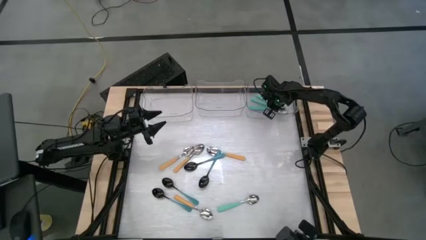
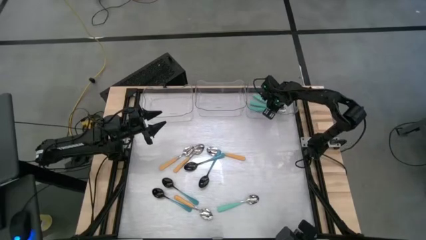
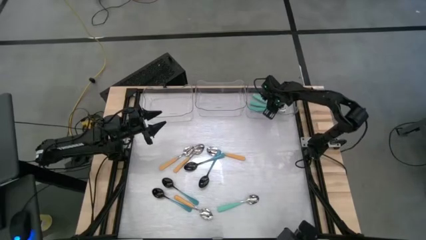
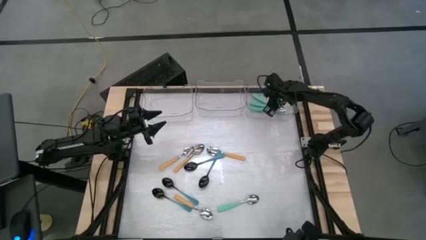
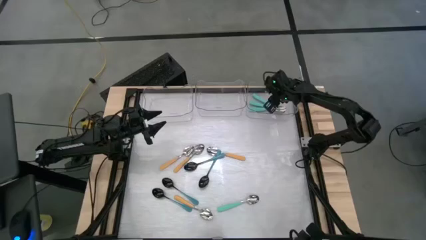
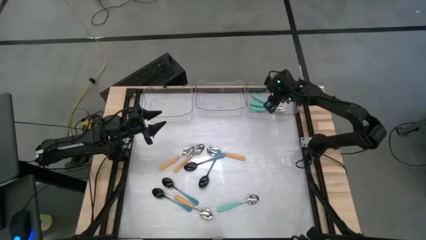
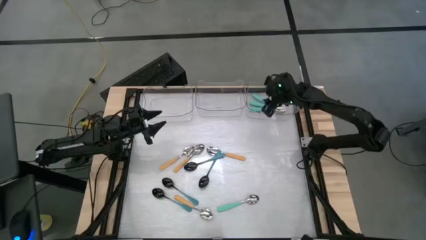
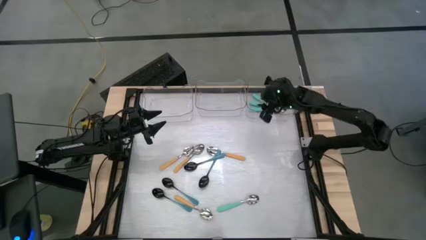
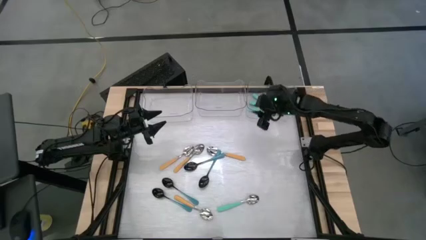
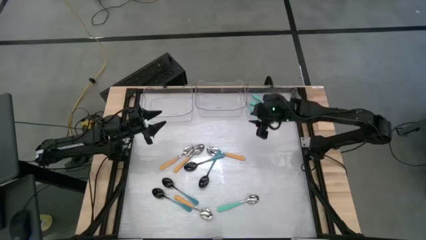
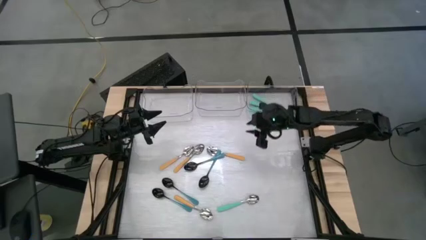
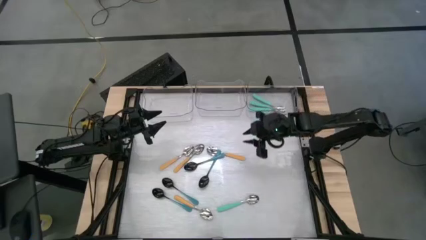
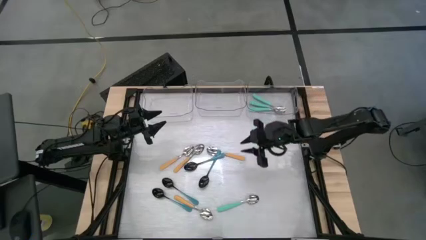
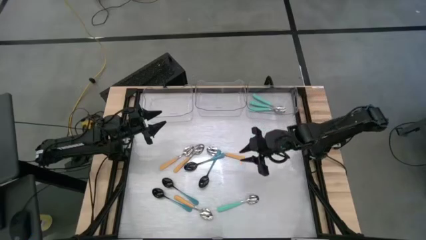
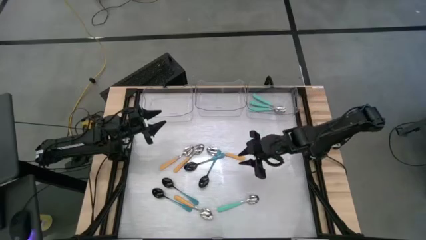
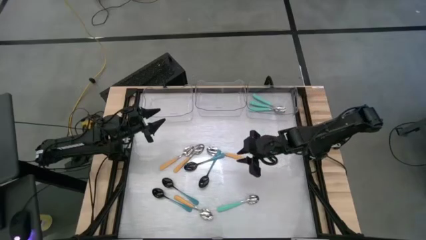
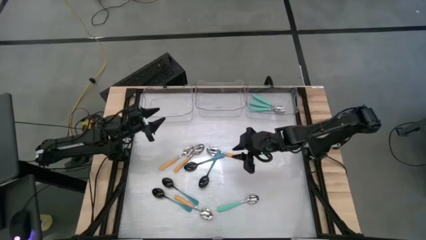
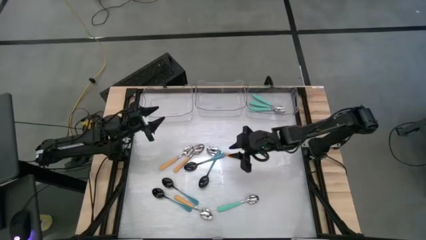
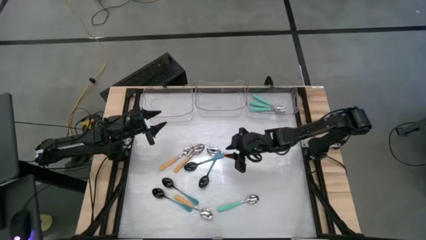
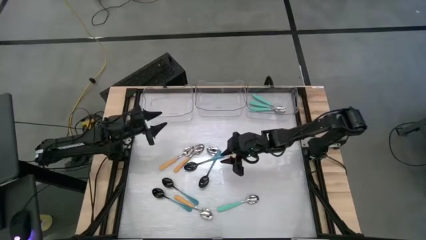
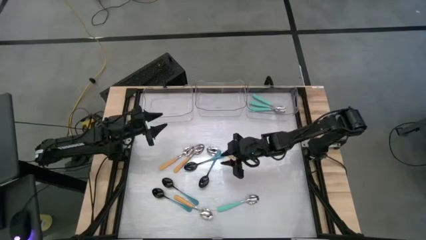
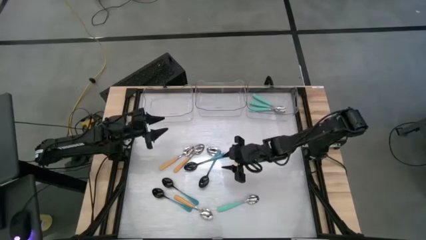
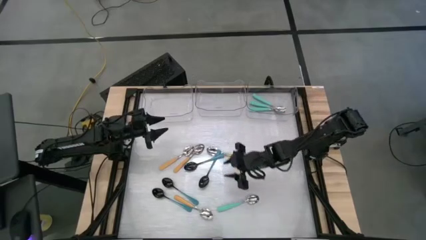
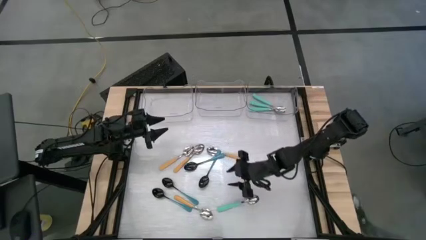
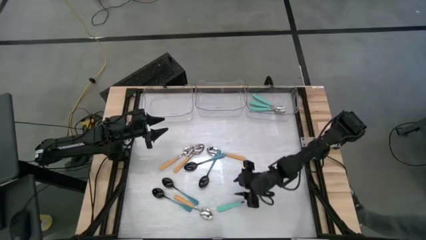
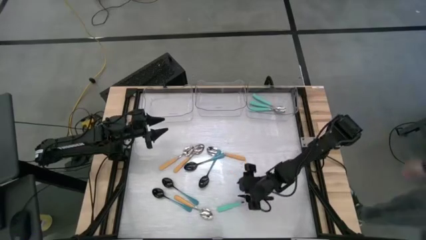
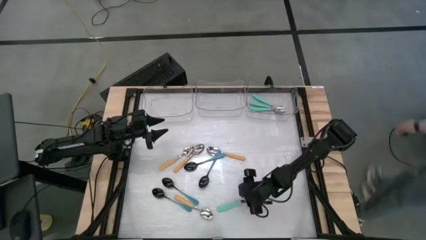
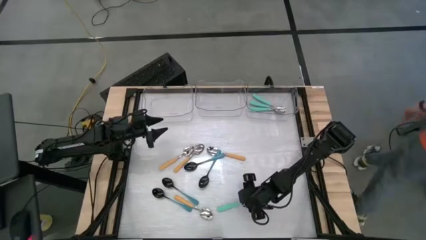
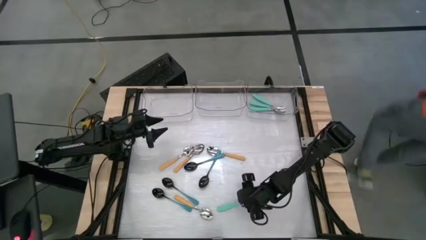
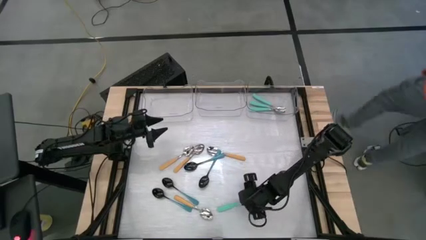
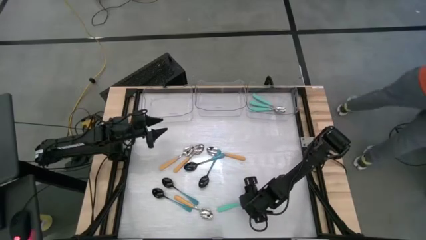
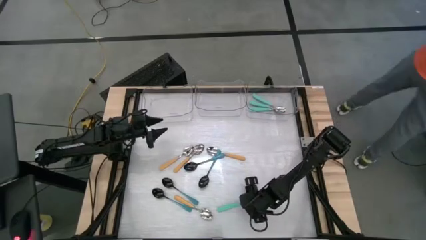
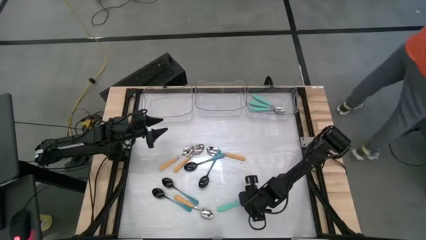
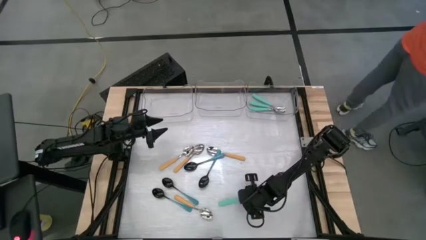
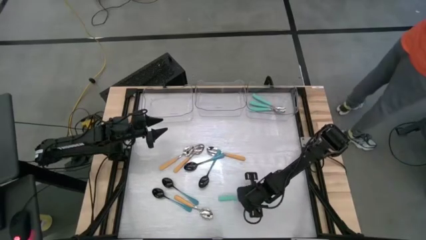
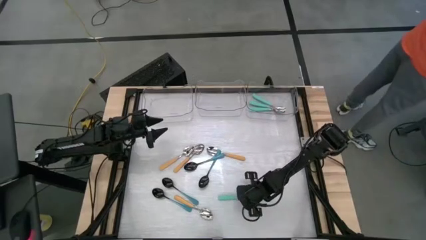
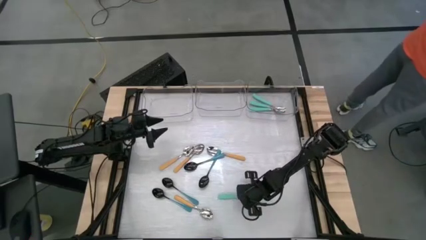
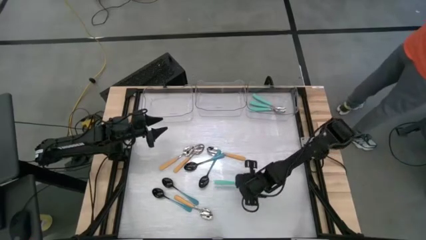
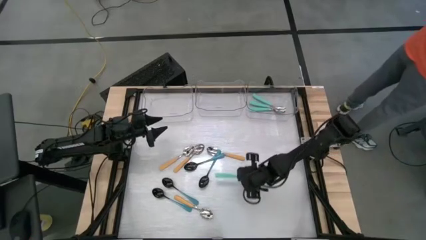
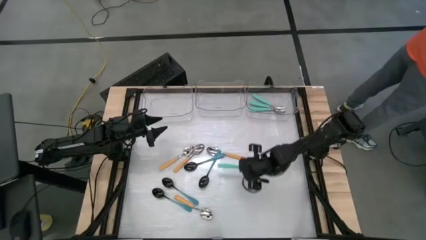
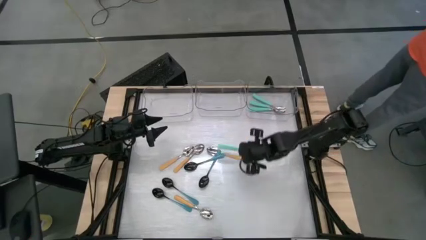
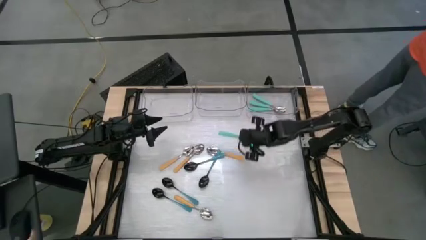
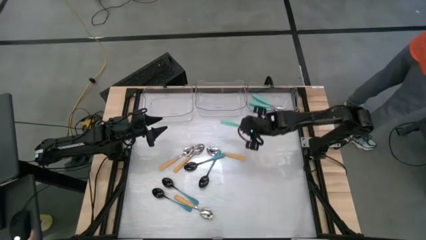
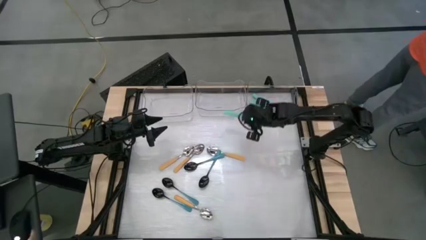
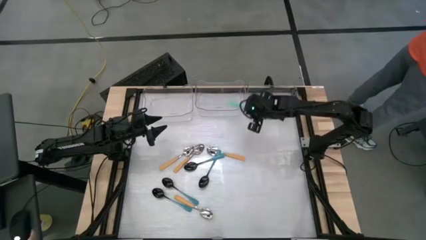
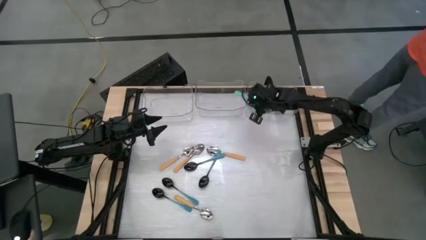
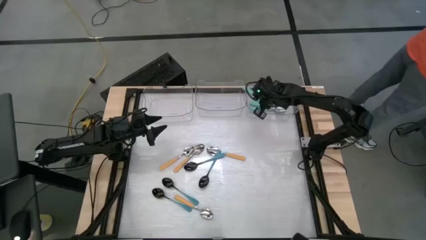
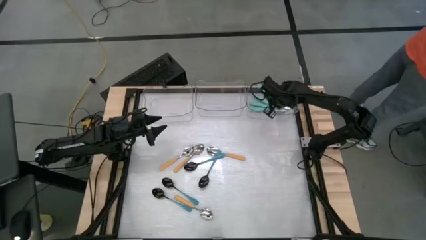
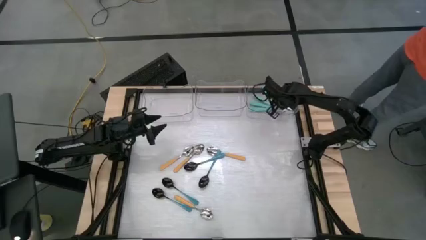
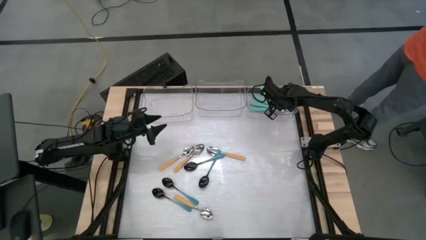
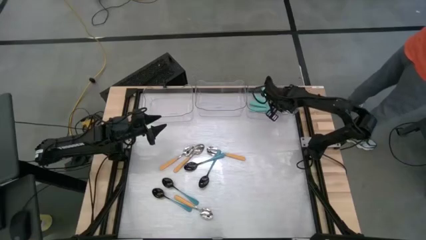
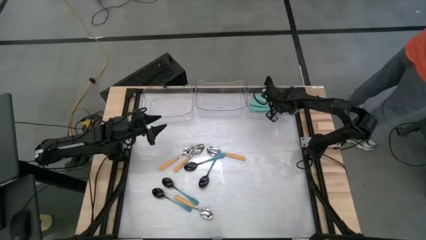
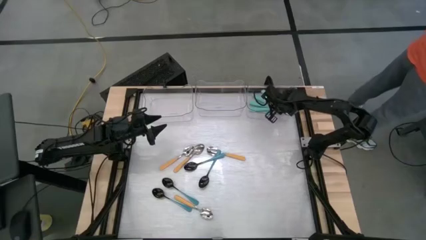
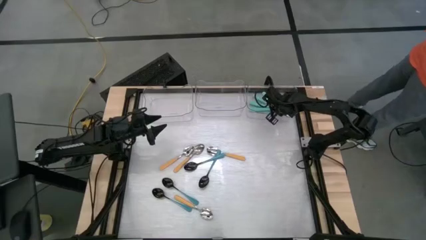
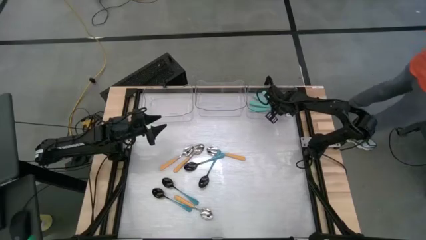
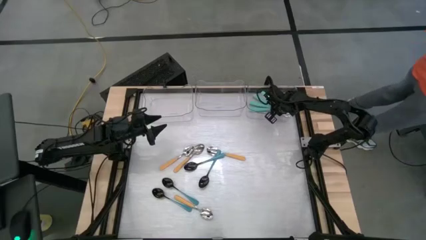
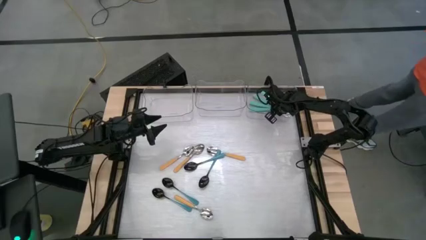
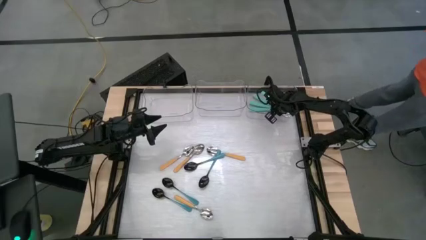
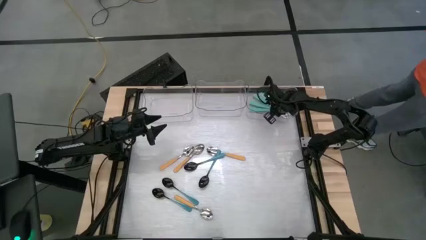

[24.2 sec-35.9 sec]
Task: Sort silverware by color (type)
Put the light blue spoon into the top right transparent bin

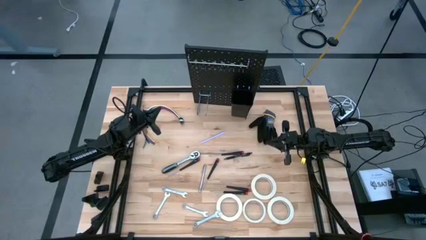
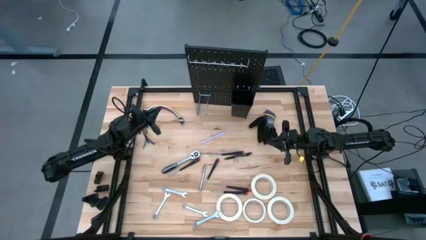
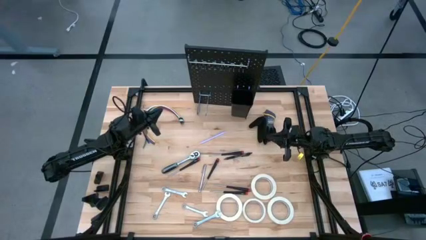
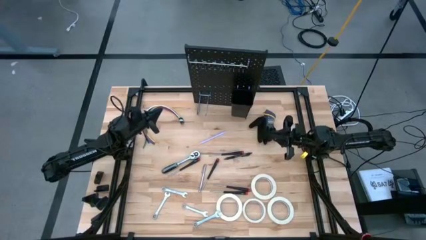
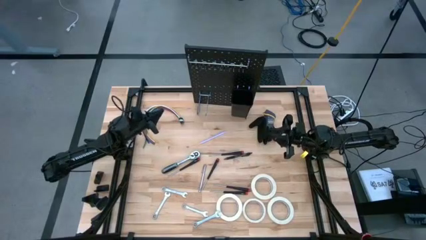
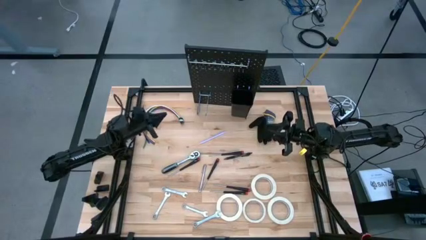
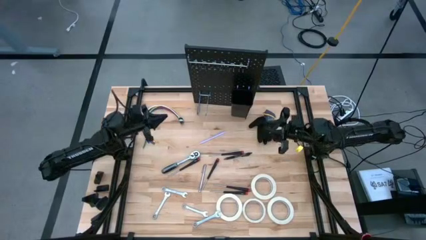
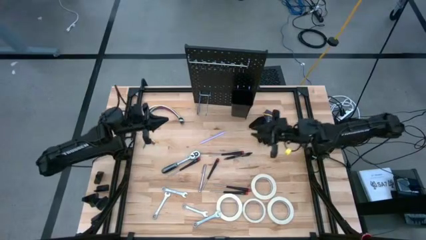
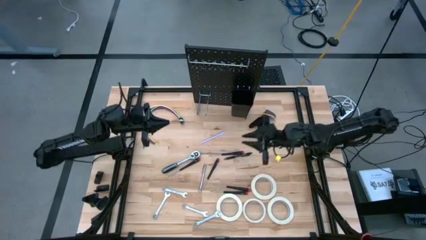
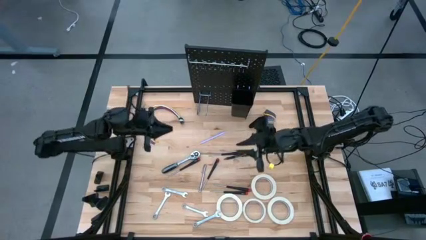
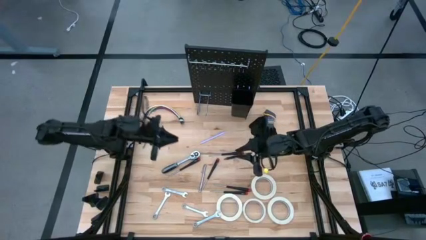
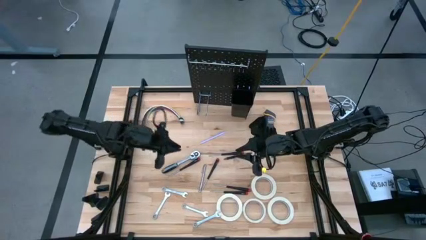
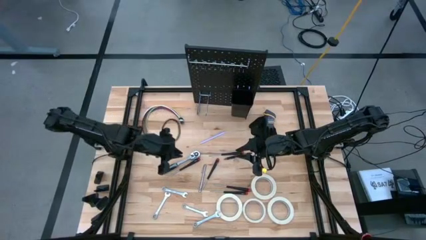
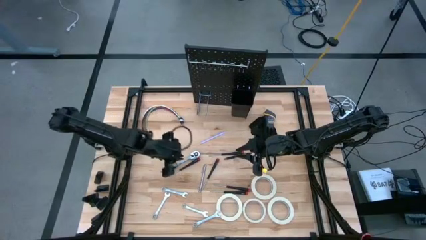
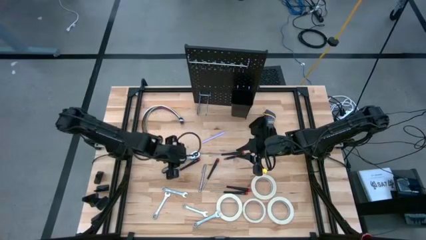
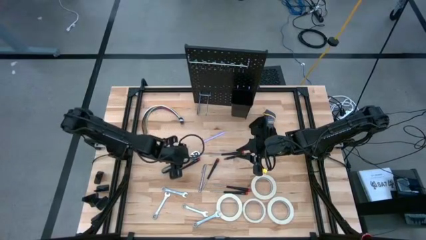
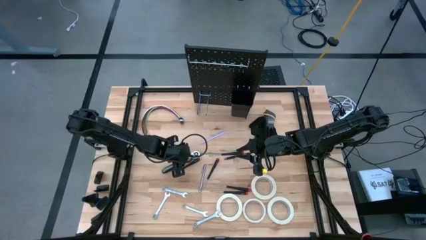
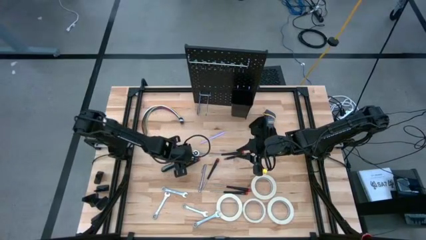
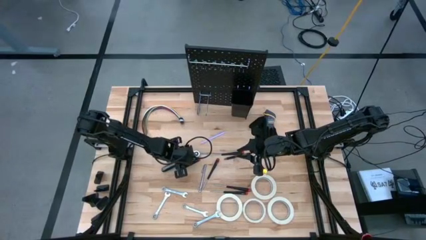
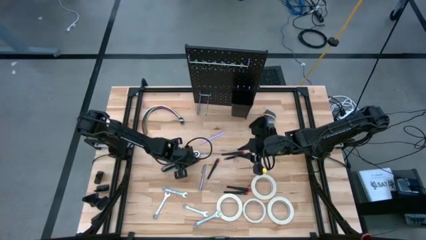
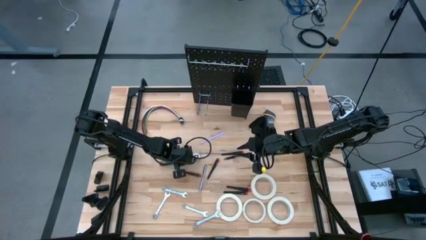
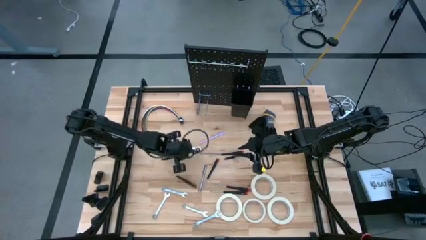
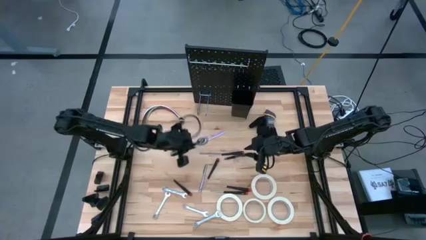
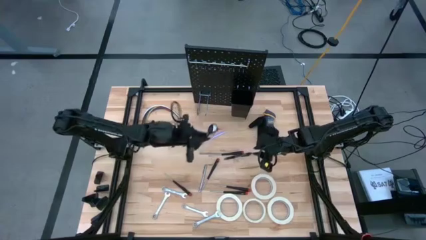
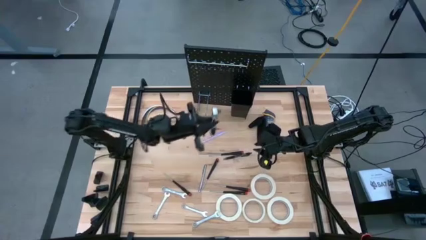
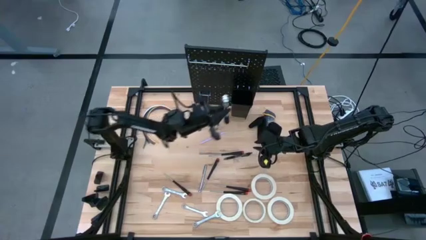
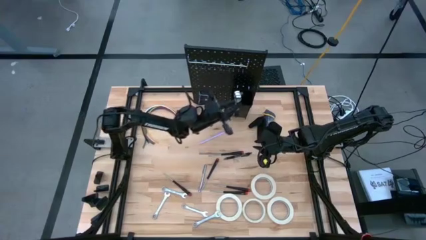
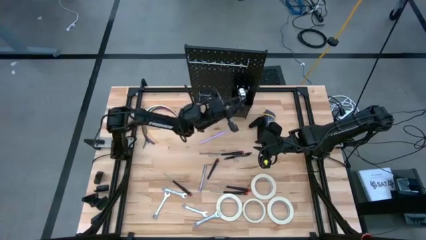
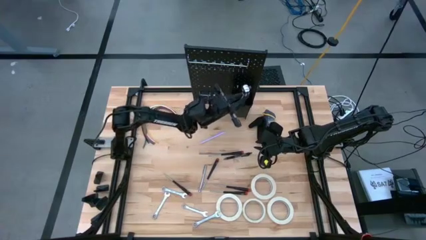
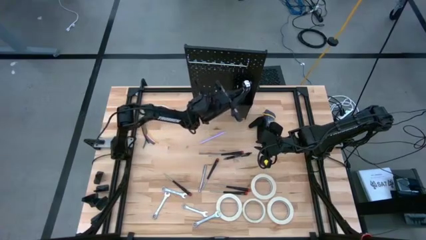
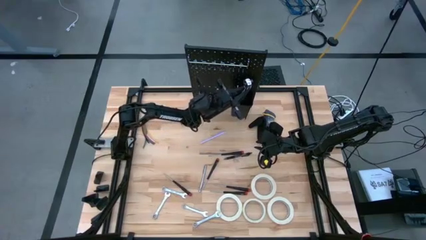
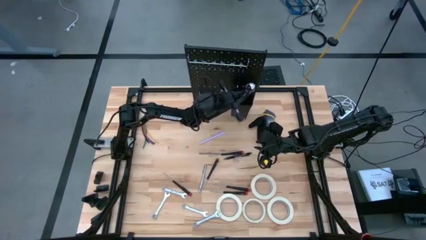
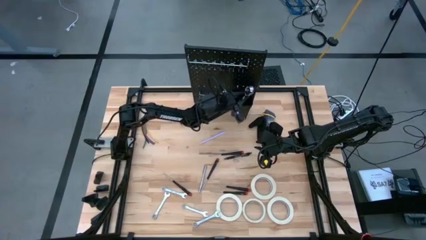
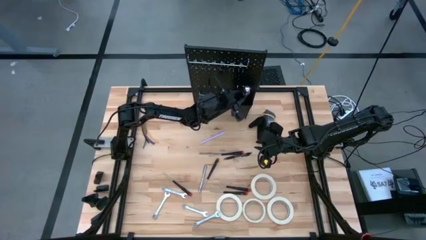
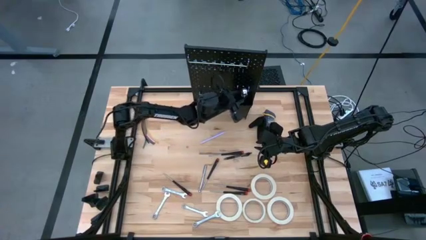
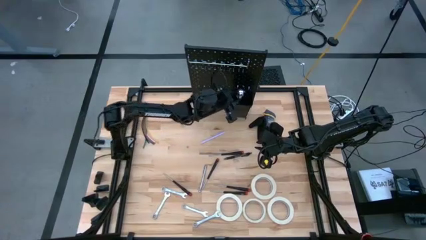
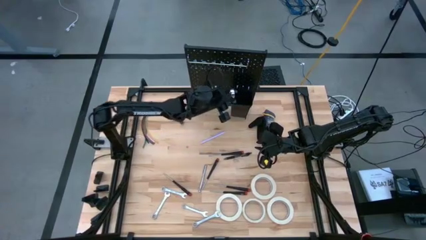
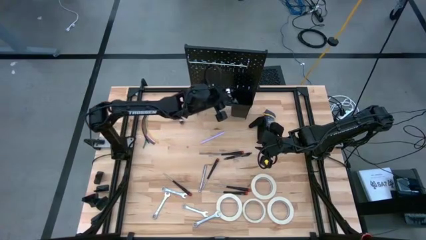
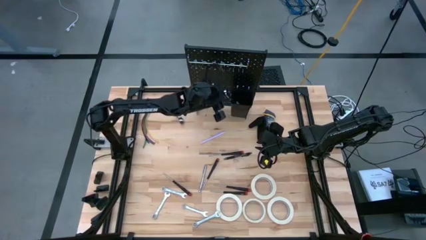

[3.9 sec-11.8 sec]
Task: Hang tools onto peg board
Put the black ratchet wrench into the black bin on the peg board
